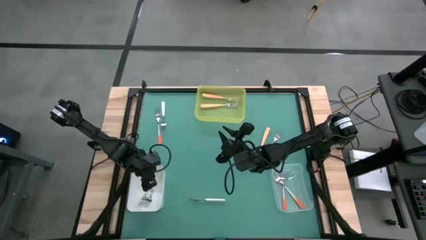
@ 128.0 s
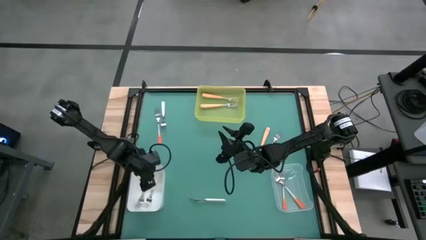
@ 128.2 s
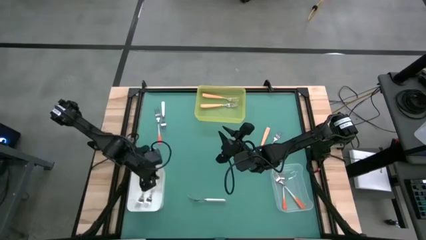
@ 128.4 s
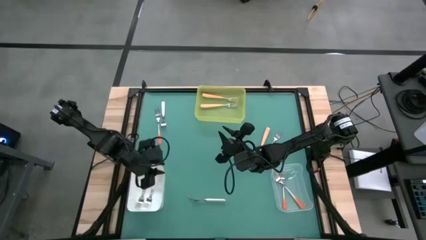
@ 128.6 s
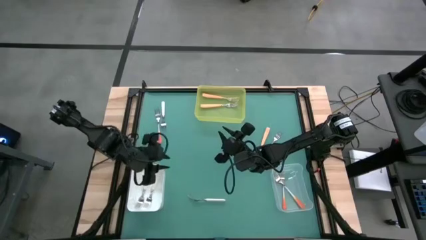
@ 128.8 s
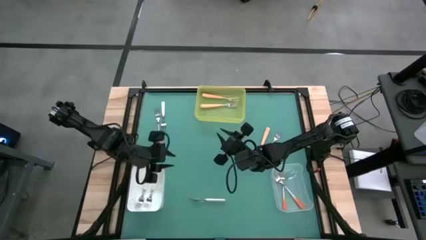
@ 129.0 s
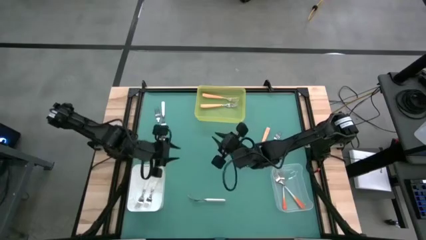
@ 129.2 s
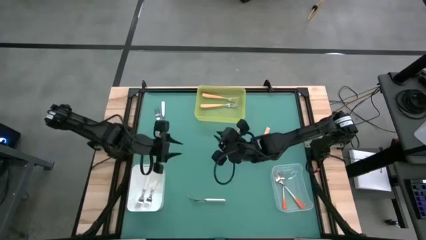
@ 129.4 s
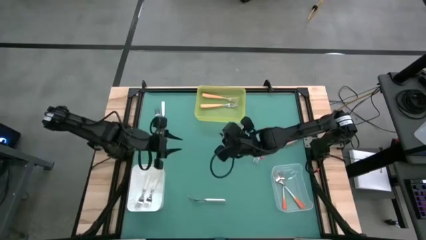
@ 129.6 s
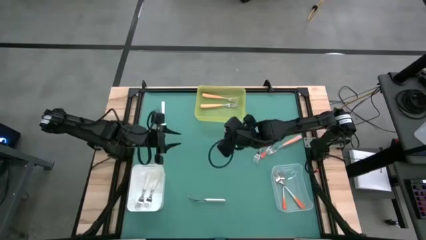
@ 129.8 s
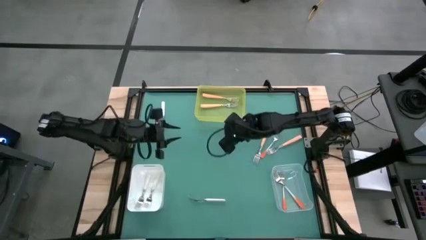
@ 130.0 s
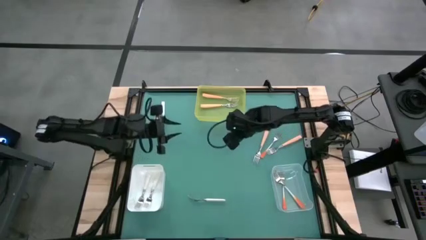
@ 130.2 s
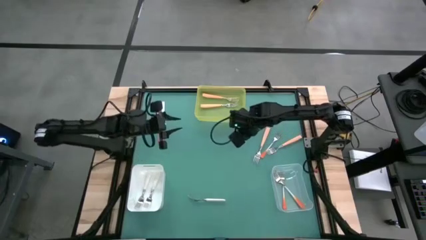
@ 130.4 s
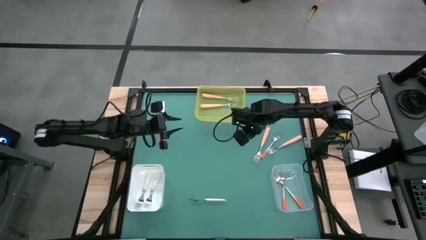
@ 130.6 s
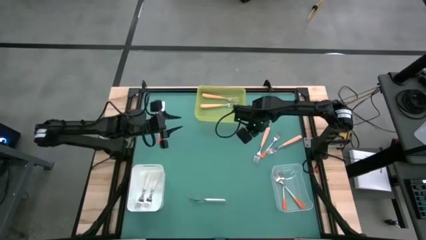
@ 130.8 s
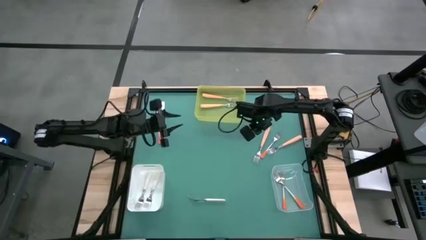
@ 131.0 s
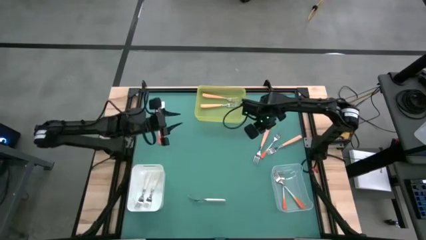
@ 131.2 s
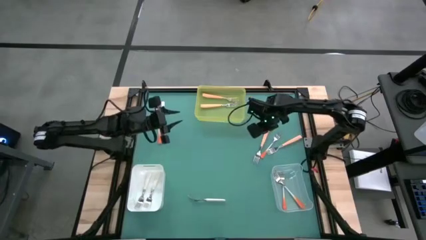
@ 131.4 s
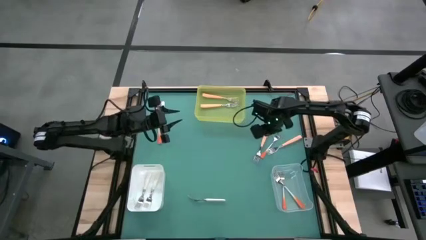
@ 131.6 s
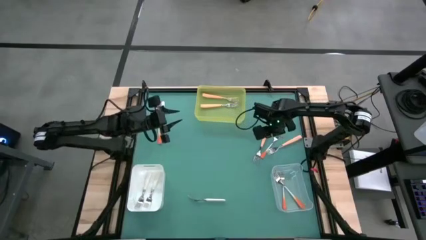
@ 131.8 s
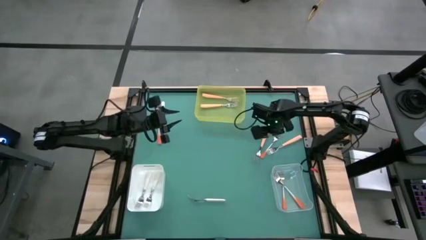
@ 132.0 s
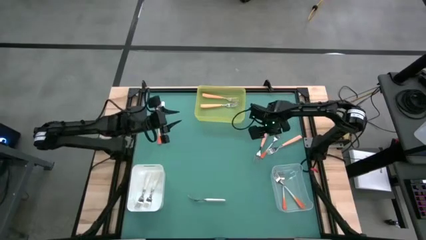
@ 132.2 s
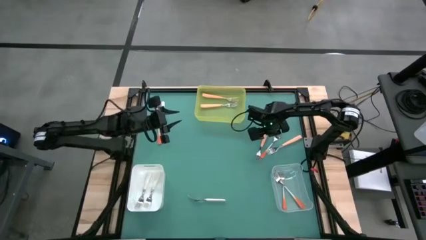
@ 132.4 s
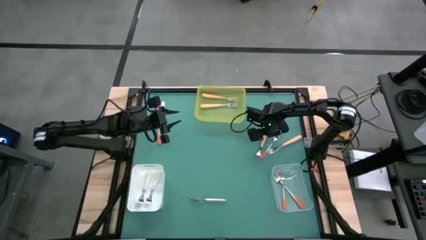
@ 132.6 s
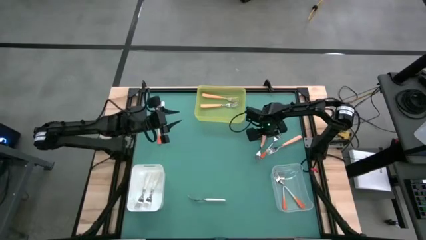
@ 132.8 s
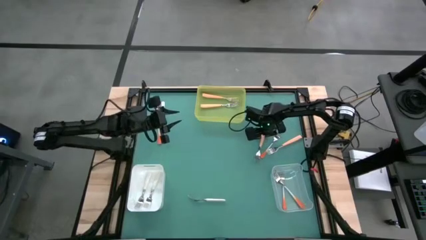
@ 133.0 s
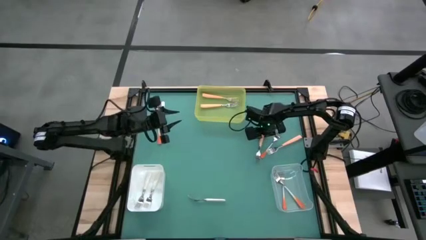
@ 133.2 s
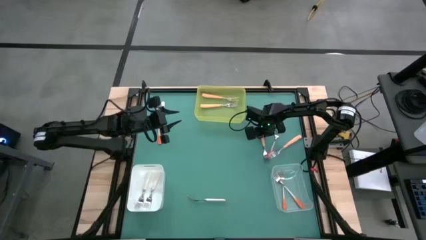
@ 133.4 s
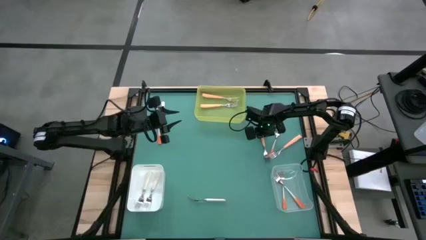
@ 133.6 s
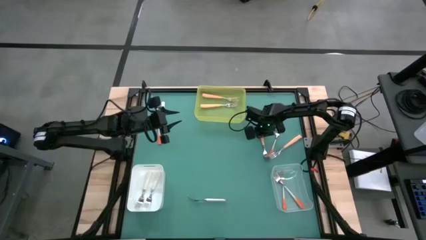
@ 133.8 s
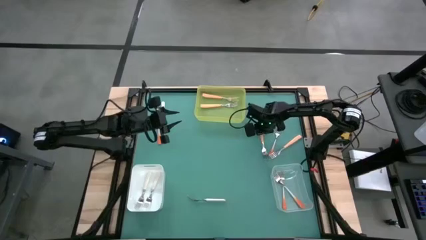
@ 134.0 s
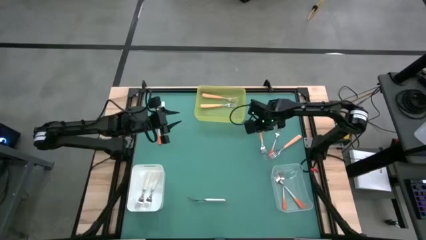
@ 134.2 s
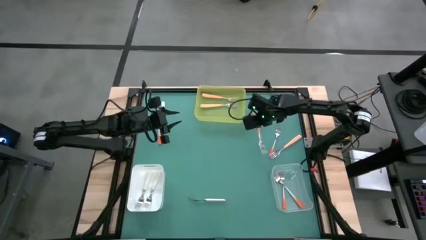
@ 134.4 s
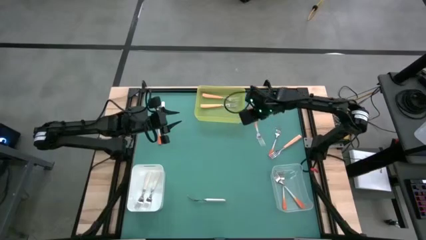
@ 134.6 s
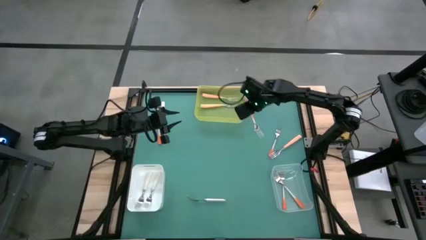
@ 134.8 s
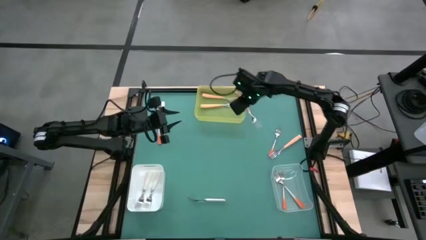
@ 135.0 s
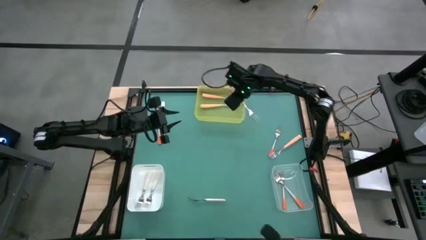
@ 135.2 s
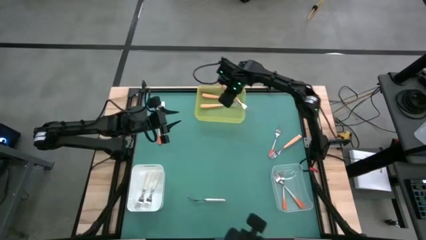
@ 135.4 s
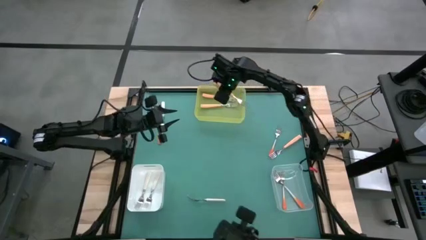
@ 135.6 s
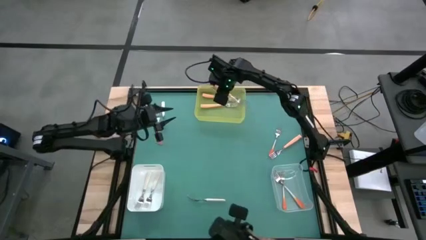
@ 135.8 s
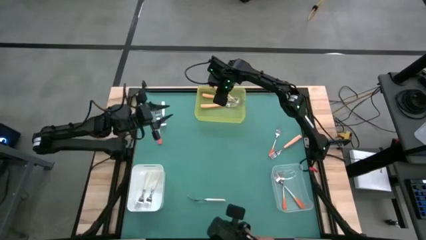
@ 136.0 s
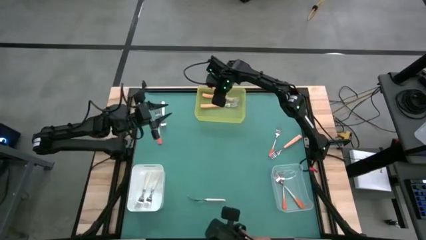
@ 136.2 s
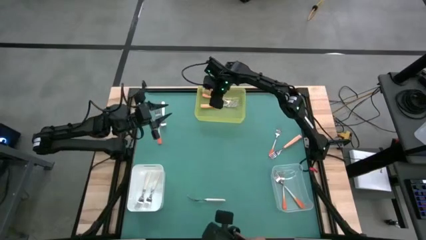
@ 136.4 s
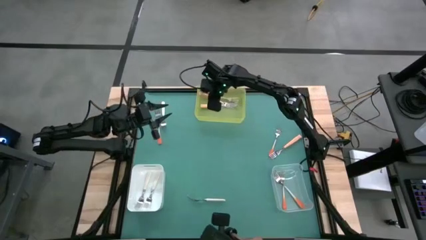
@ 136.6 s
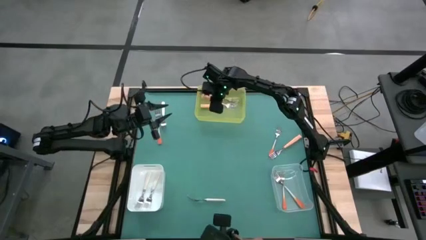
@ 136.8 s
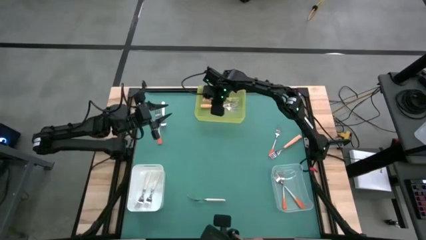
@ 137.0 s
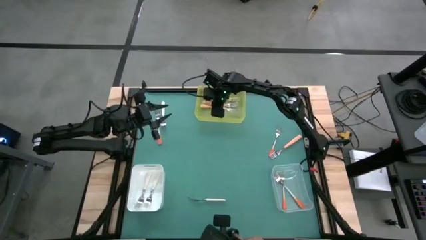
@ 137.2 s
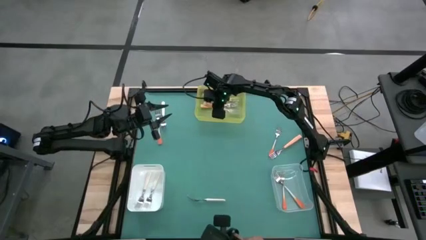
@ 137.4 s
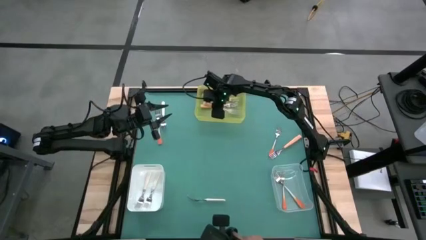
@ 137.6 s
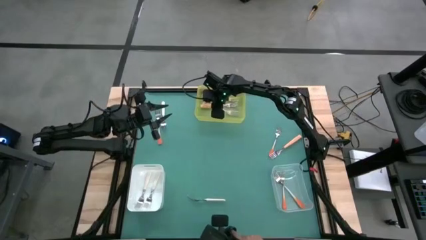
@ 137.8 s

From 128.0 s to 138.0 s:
Task: Sort silverware by color (type)
Put the yellow fork into the yellow bin

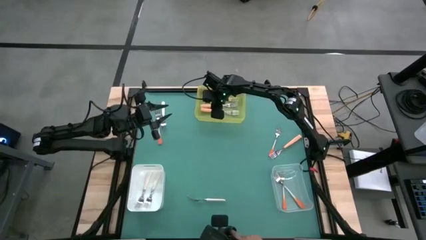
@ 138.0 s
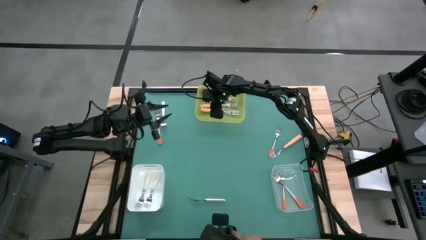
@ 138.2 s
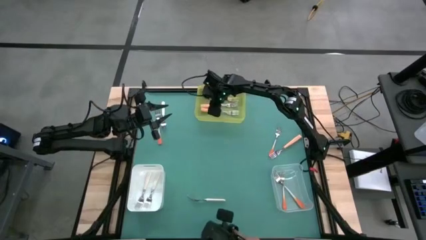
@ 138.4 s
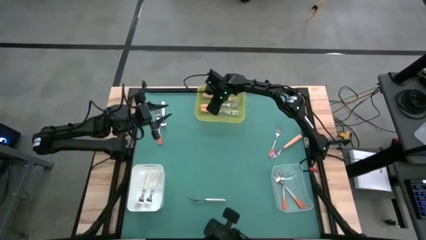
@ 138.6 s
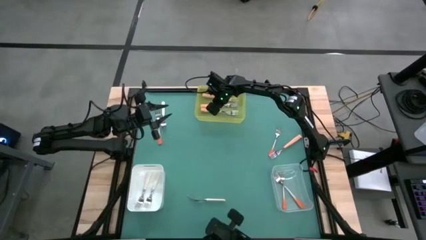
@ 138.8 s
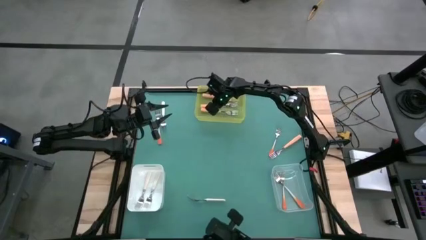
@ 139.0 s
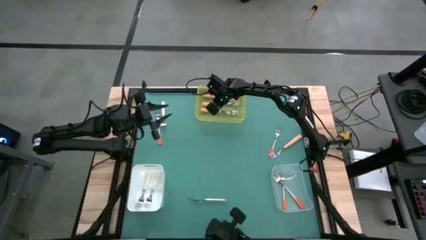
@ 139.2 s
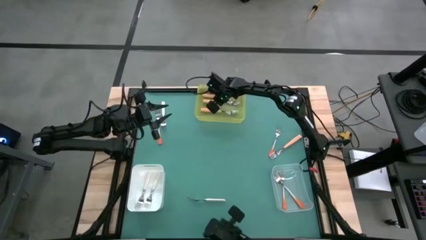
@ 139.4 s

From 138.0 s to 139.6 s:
Adjust the orange fork
